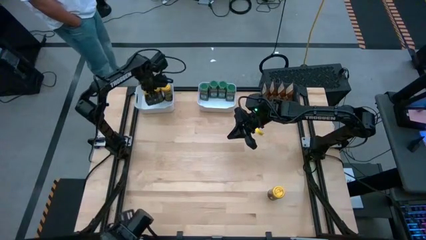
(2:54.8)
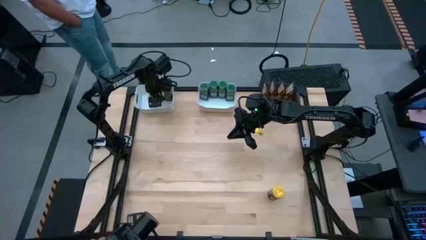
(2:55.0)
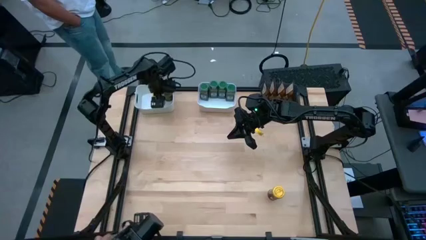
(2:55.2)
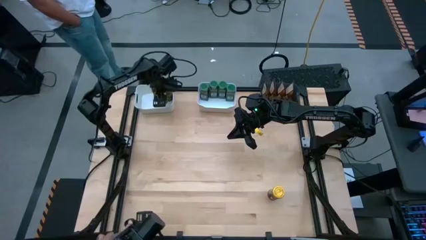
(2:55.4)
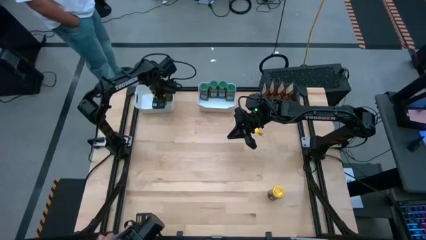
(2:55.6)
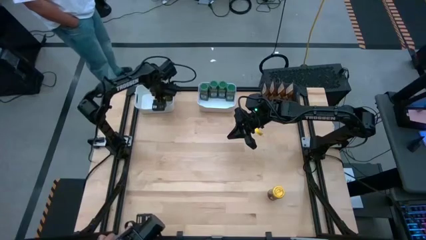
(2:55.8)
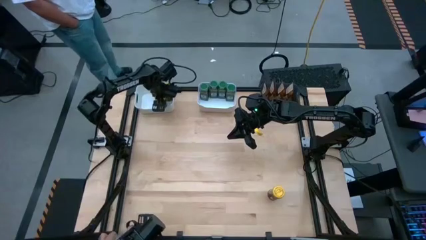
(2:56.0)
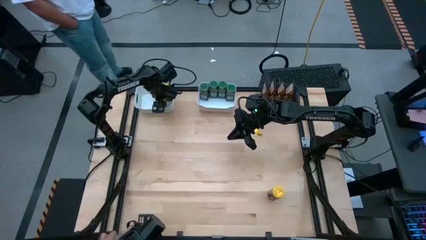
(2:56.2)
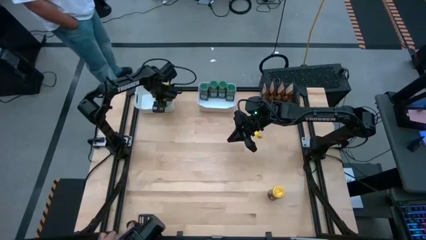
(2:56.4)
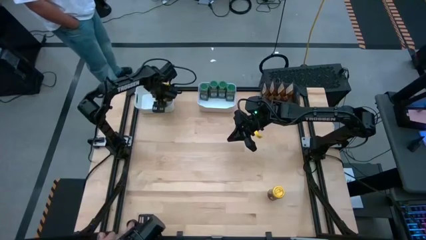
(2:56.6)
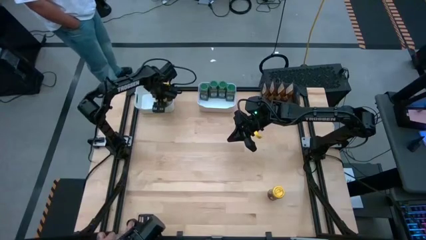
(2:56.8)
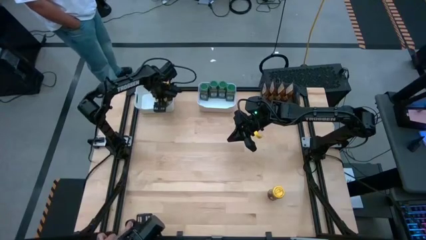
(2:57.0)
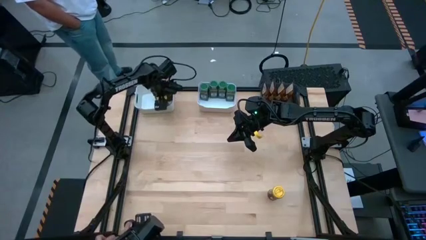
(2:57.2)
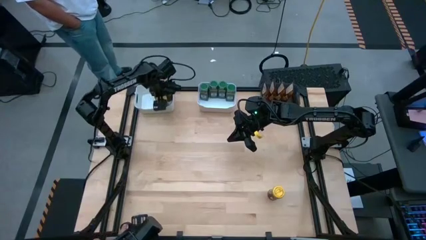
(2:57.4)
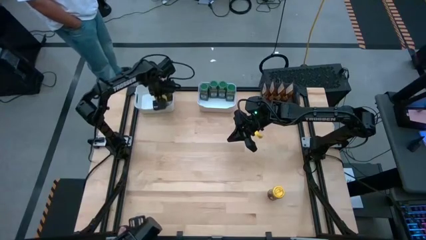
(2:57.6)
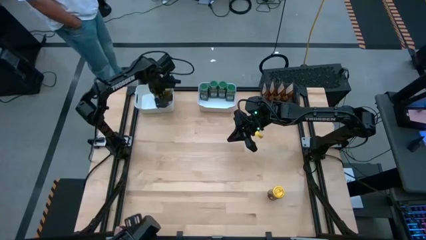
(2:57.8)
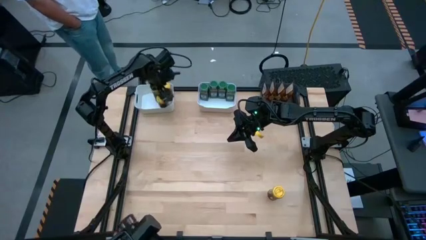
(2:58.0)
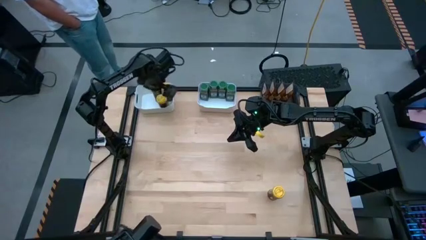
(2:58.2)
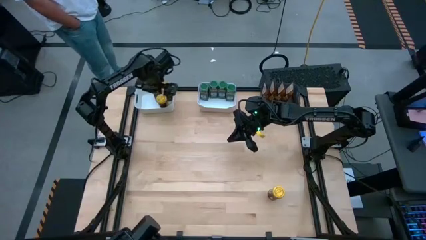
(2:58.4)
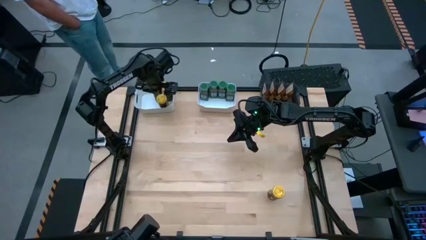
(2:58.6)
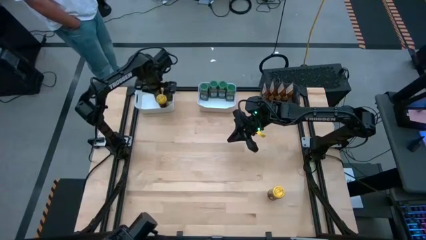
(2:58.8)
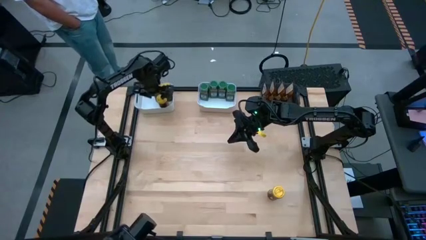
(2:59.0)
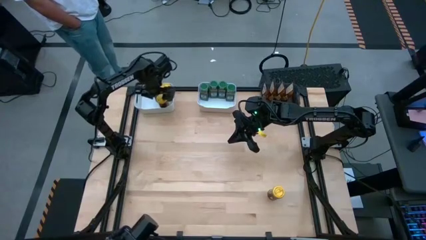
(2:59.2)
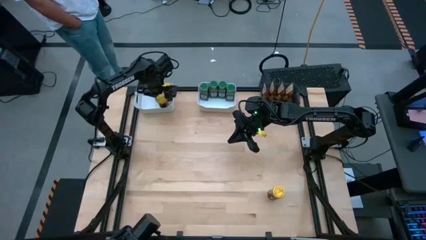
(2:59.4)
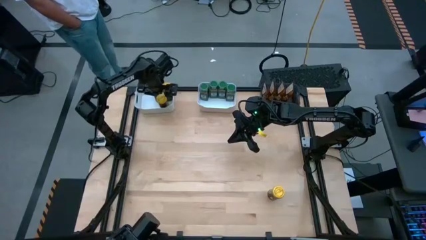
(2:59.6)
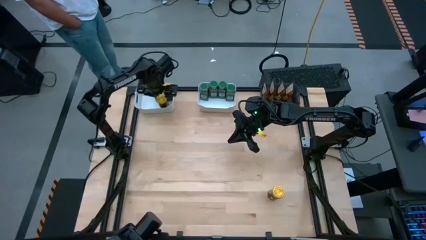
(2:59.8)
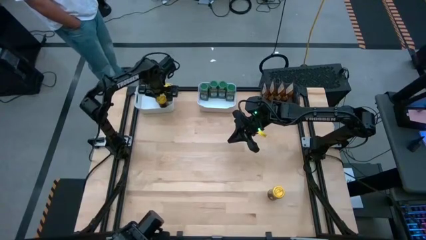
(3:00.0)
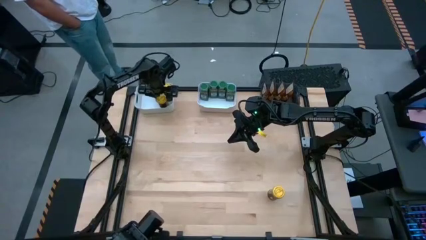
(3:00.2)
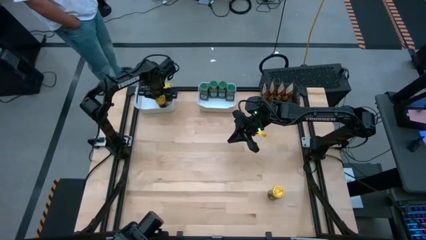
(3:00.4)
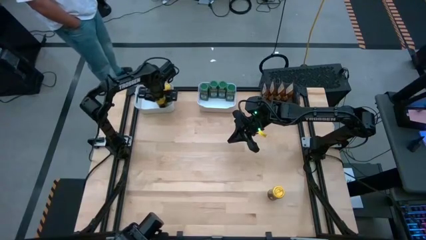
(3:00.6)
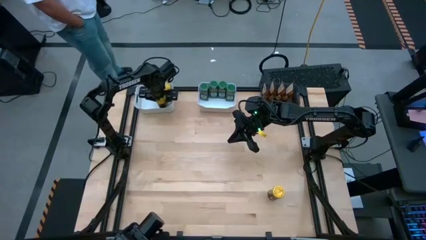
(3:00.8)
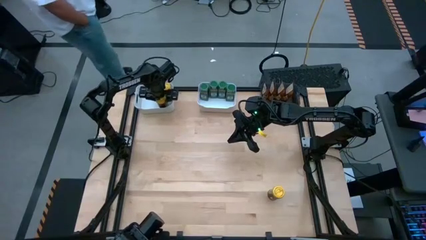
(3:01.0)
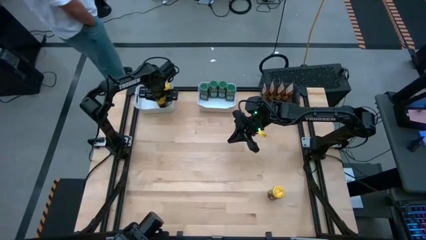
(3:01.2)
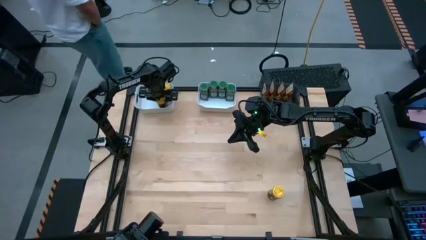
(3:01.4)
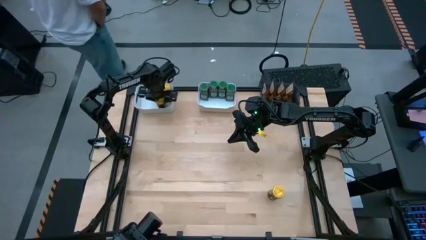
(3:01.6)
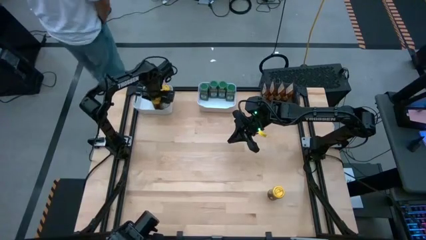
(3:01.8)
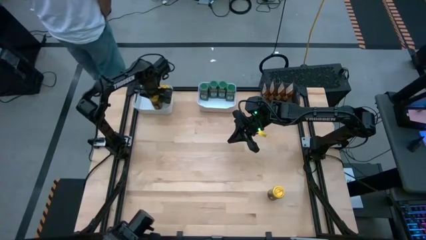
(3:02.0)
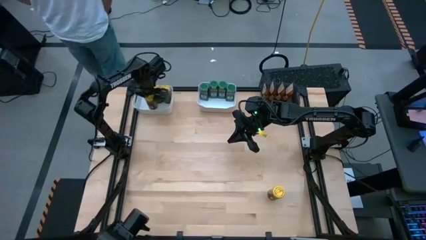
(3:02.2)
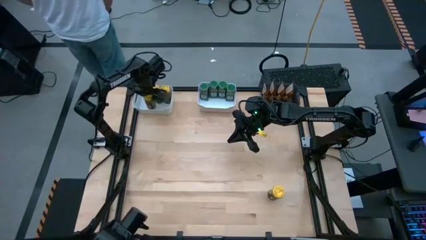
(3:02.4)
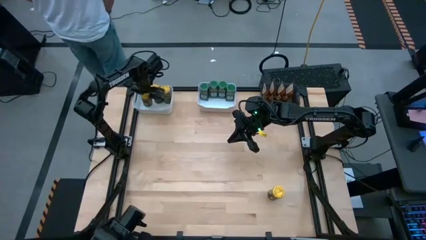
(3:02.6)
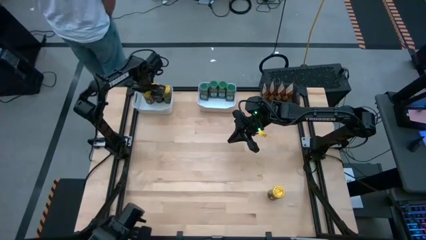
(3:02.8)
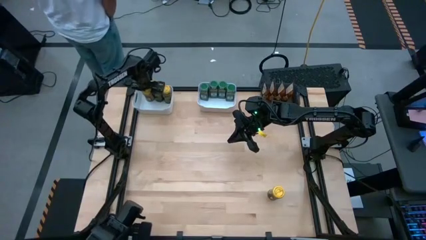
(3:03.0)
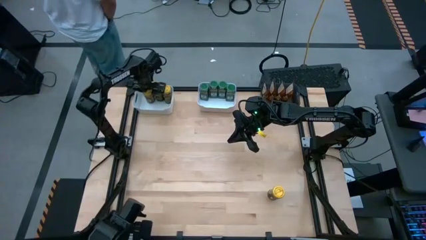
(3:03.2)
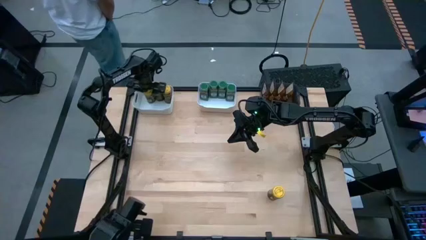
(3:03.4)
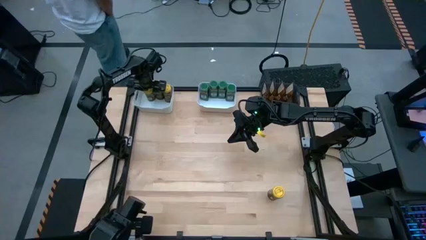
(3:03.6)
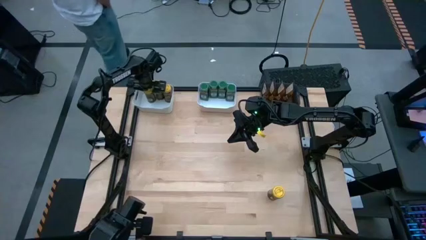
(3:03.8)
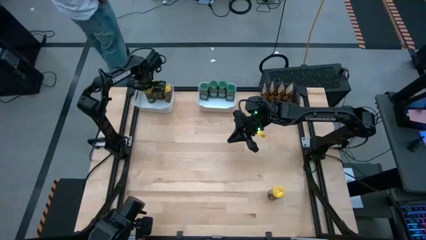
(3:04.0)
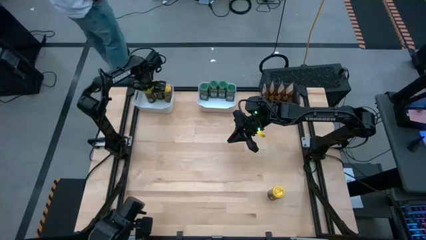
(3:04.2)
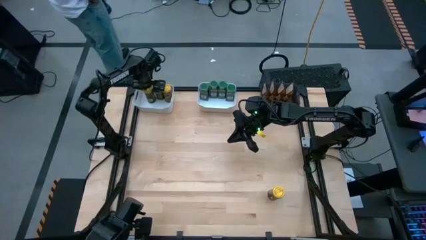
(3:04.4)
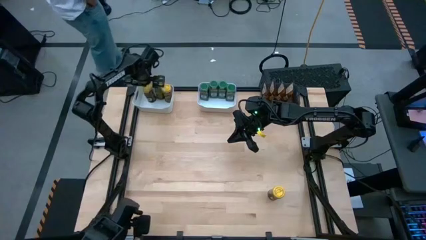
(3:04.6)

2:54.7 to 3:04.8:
Task: Sort spices by type
Put the left yellow seasoning bottle into the left white bin

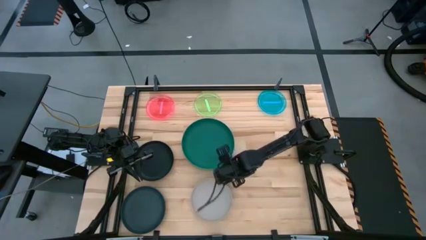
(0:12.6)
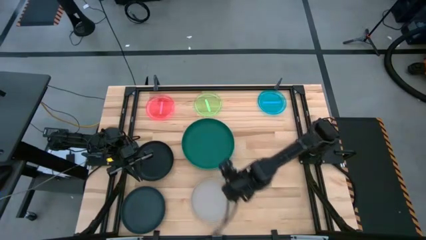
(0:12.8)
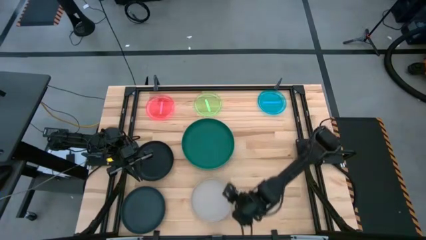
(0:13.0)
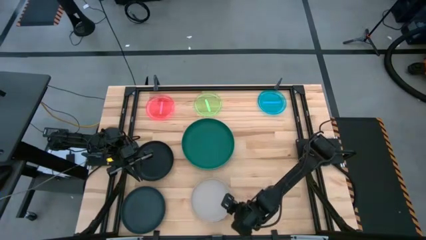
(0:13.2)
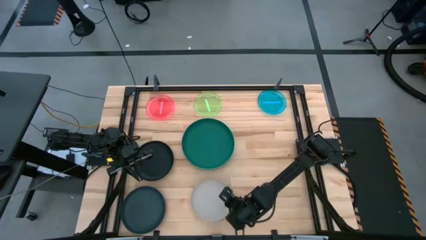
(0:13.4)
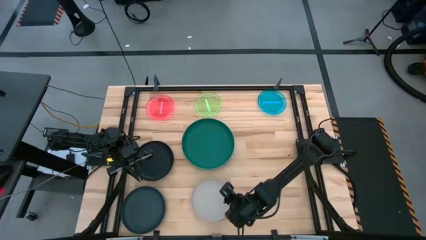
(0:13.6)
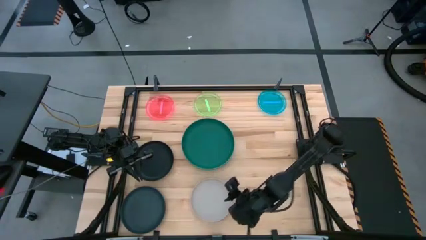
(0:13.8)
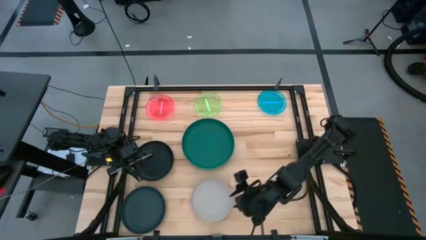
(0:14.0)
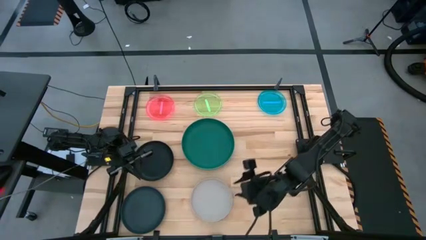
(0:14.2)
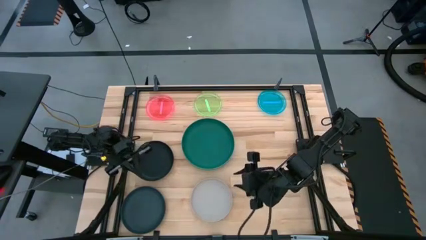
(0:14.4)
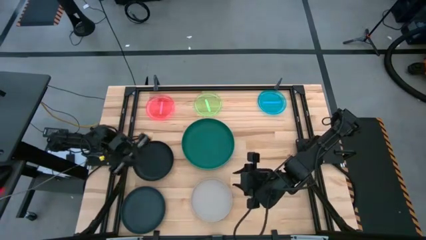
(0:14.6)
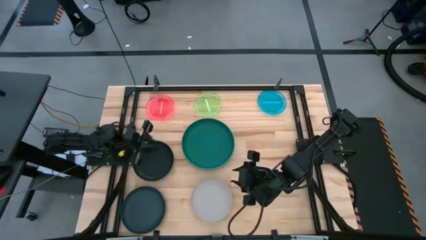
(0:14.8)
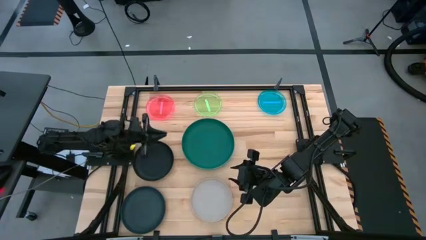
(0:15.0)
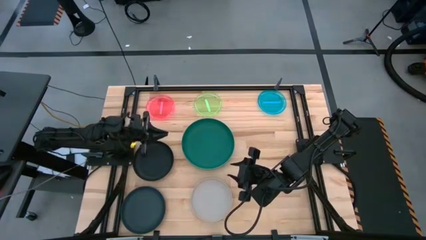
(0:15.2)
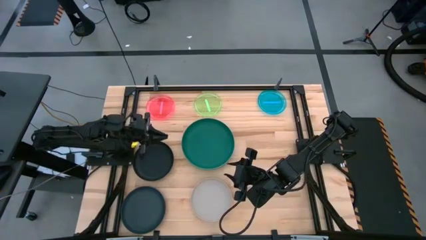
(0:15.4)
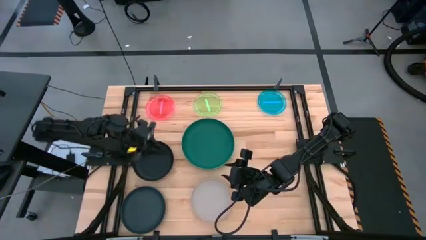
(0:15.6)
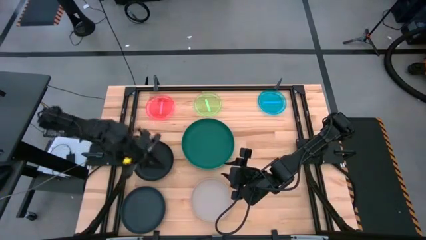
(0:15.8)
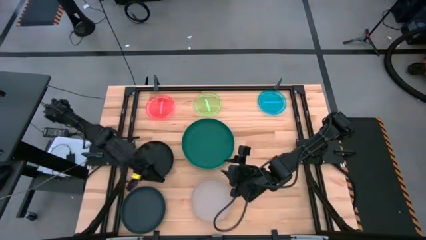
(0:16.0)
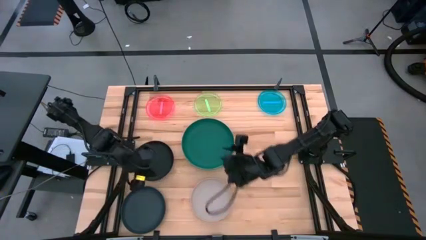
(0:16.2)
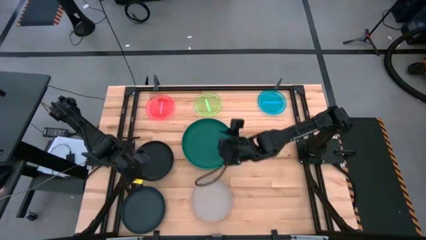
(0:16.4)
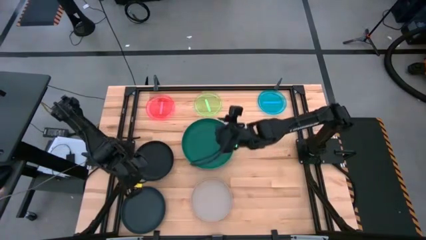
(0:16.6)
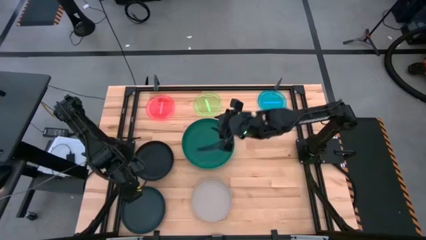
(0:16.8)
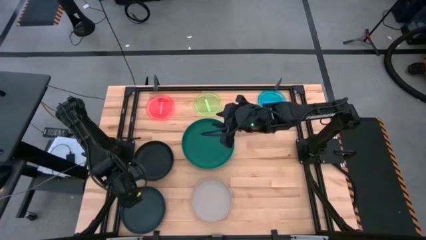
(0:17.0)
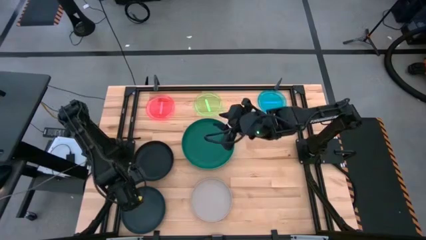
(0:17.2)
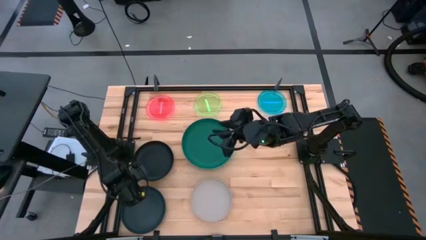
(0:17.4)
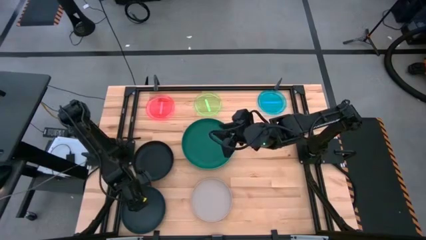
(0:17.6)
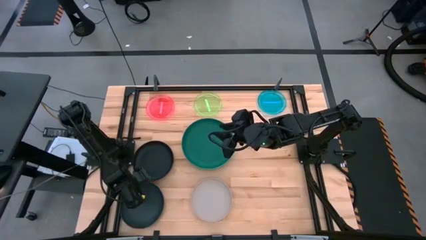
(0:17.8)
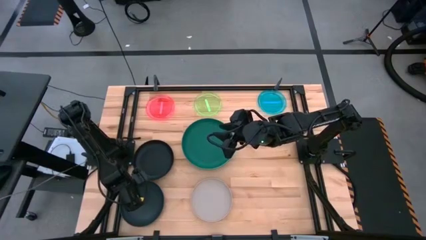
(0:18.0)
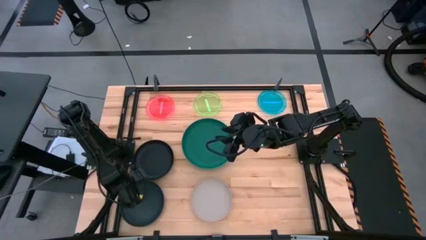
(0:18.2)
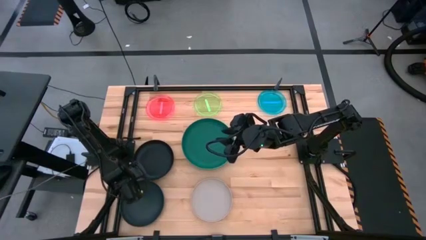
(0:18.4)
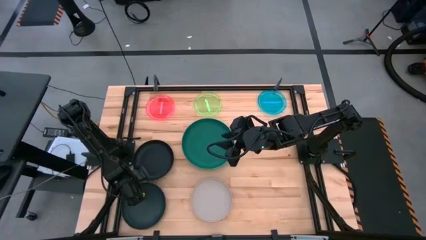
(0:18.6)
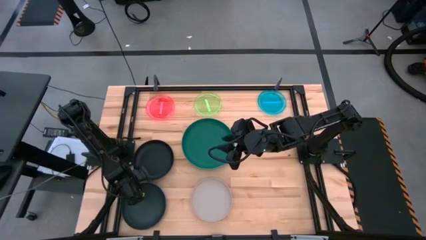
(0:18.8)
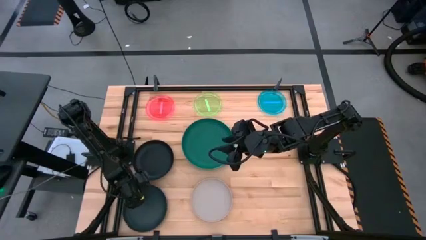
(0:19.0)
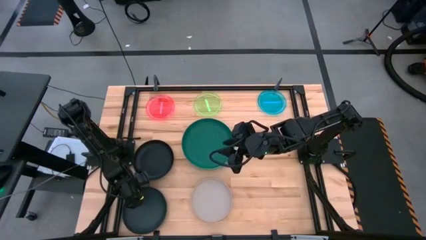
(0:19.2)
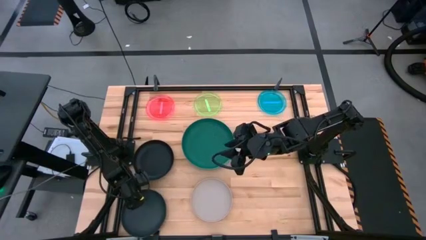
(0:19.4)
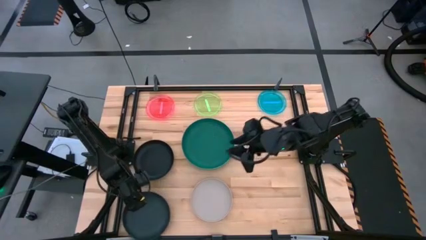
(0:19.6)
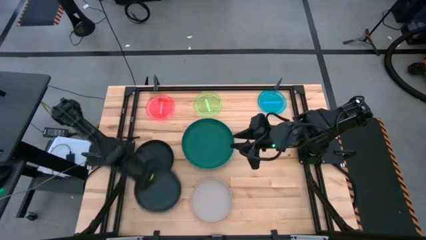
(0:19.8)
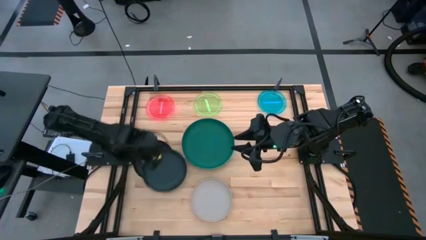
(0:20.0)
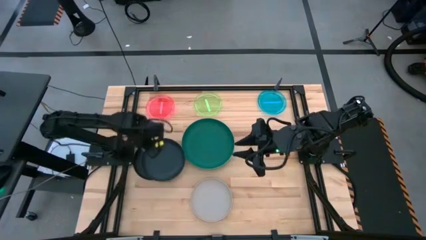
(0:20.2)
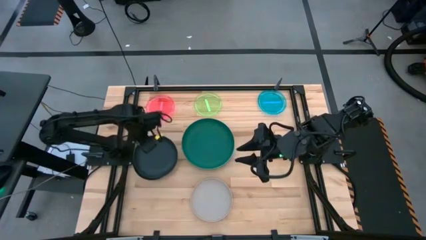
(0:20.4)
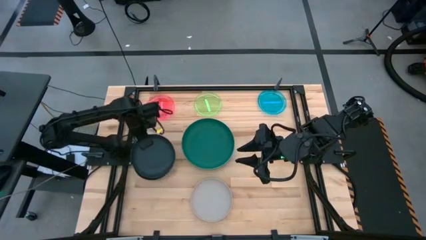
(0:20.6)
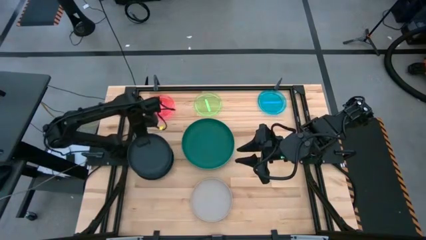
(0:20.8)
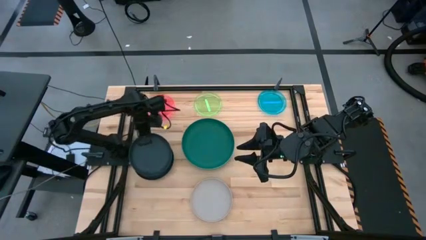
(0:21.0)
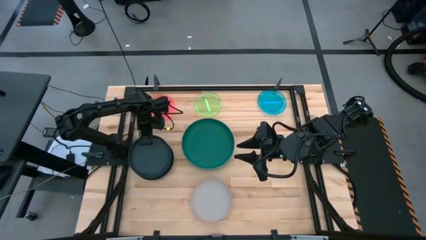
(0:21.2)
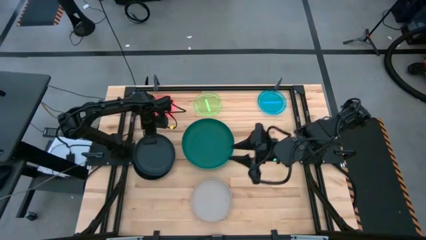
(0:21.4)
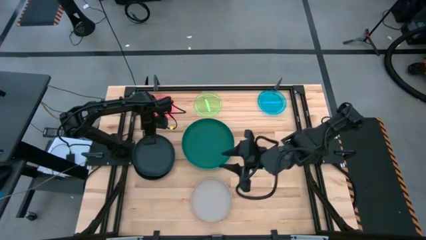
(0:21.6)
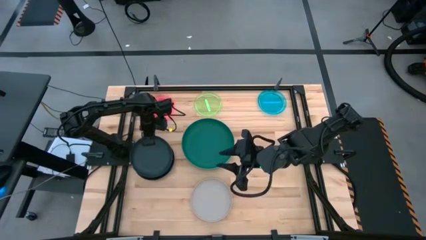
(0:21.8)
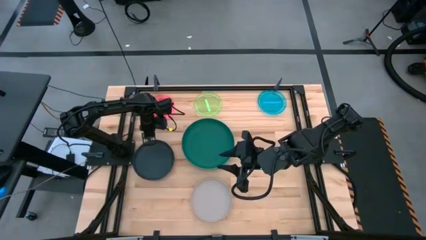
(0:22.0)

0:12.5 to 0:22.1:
Task: Stack plastic plates
Stack the dark blue plate on the black plate
